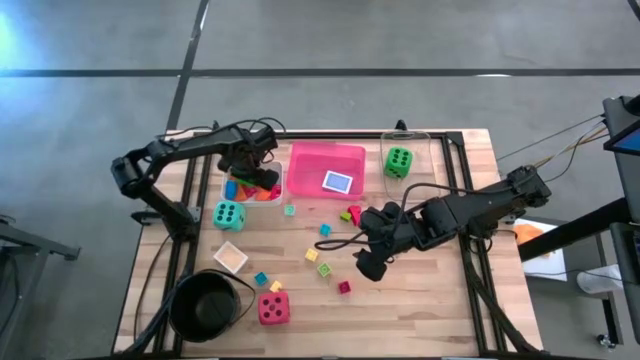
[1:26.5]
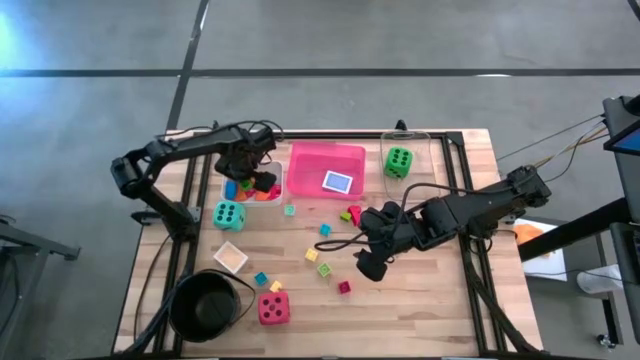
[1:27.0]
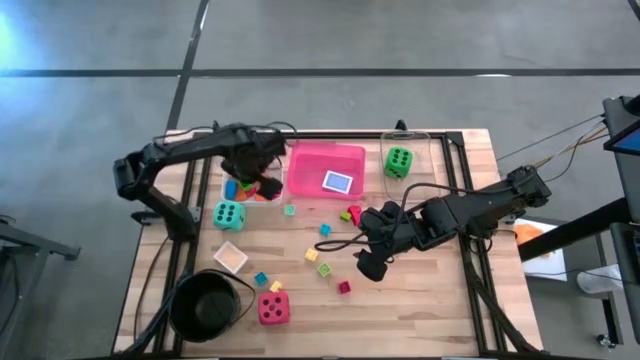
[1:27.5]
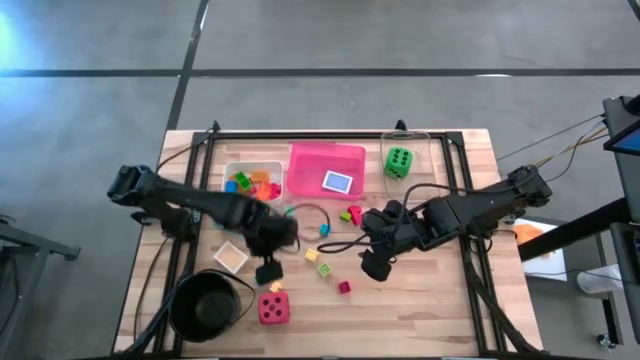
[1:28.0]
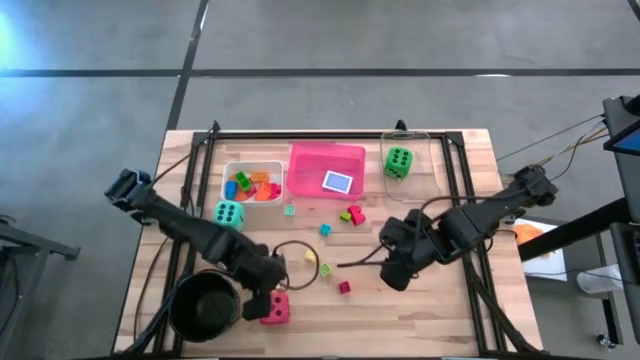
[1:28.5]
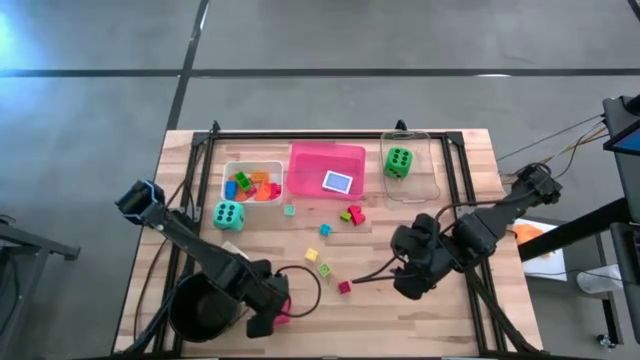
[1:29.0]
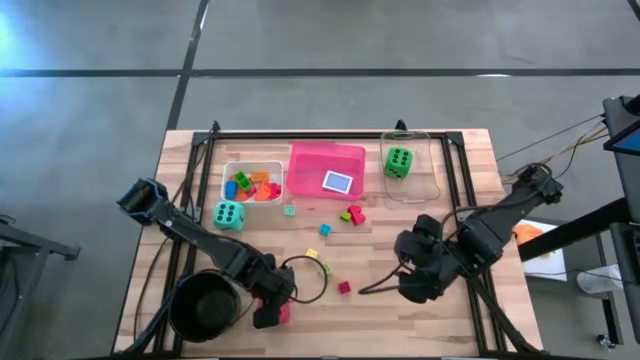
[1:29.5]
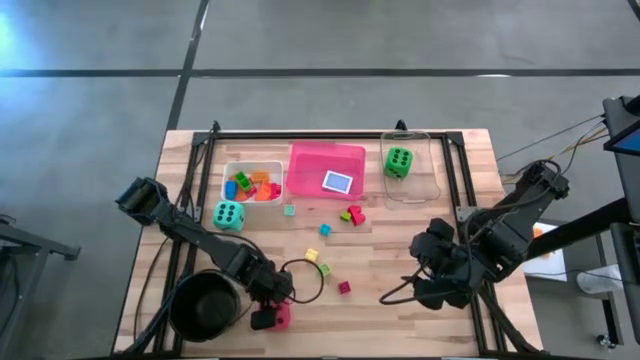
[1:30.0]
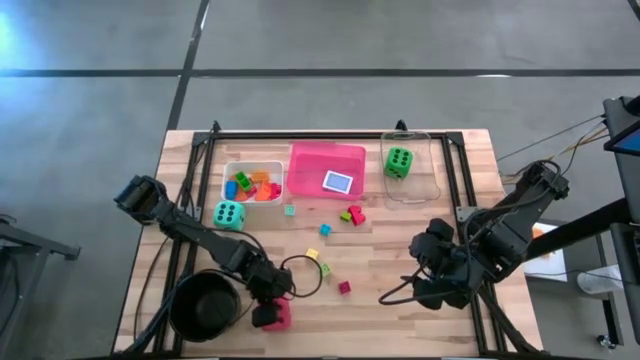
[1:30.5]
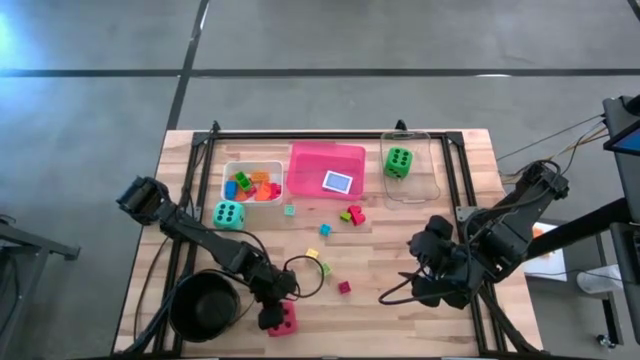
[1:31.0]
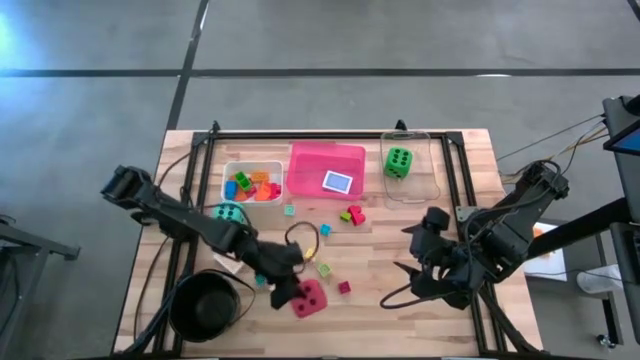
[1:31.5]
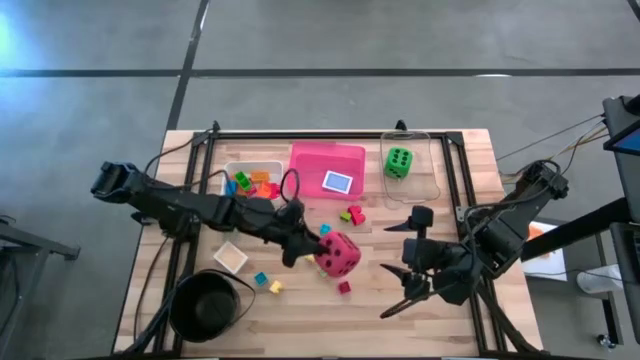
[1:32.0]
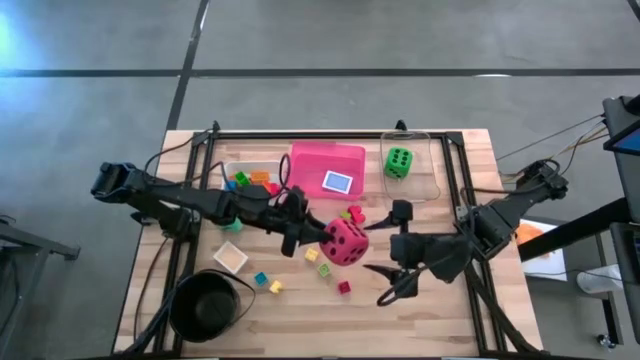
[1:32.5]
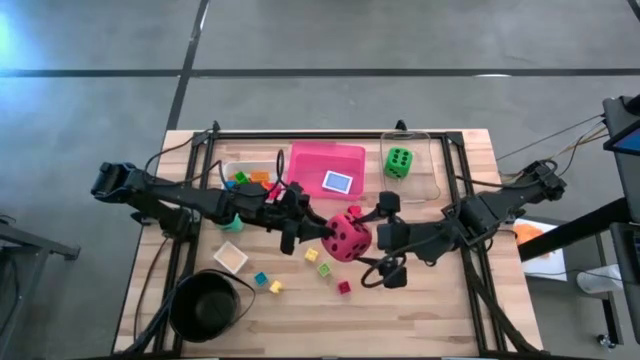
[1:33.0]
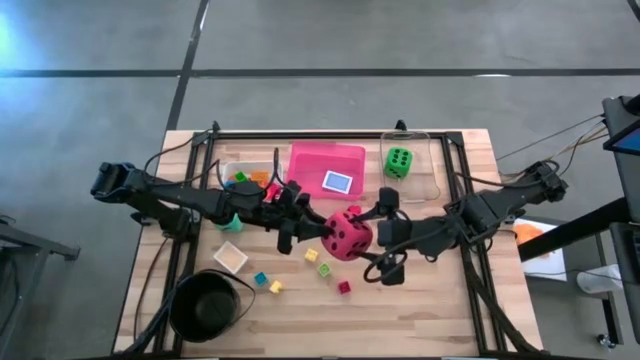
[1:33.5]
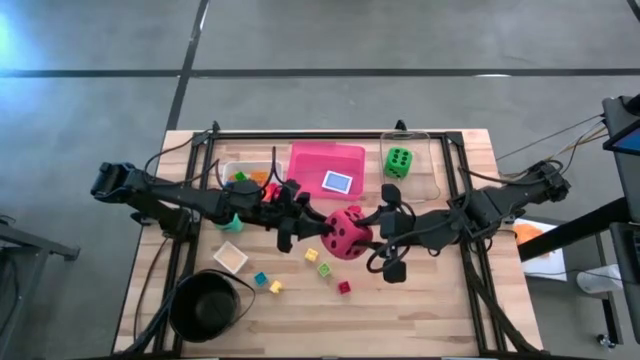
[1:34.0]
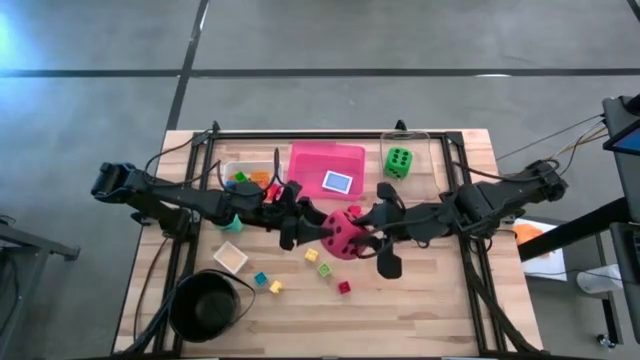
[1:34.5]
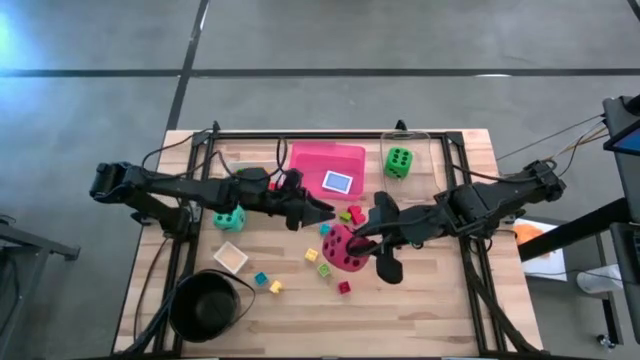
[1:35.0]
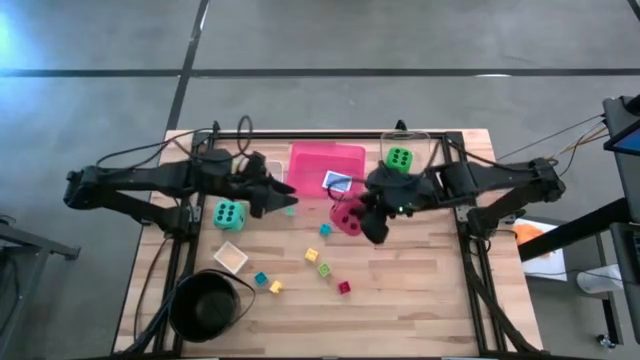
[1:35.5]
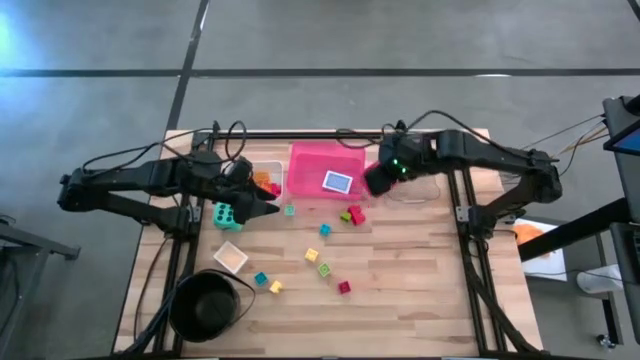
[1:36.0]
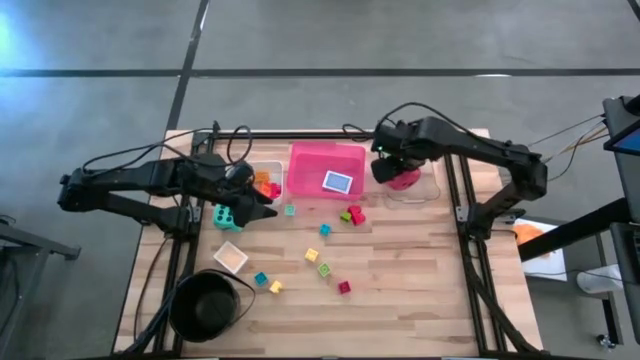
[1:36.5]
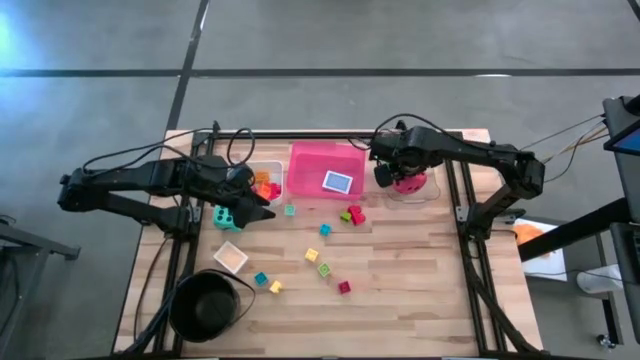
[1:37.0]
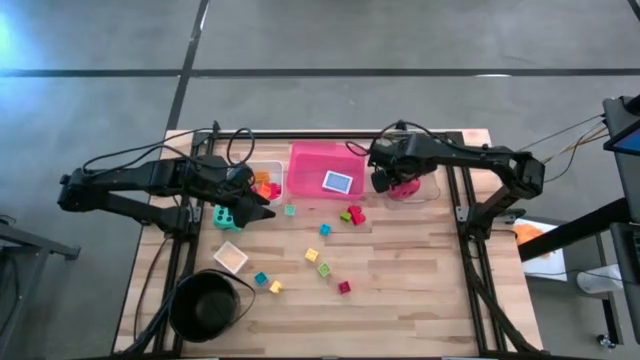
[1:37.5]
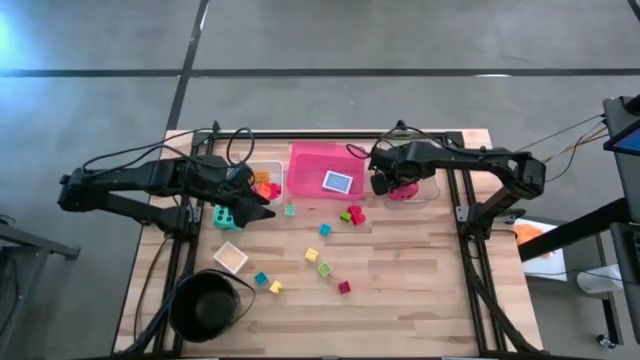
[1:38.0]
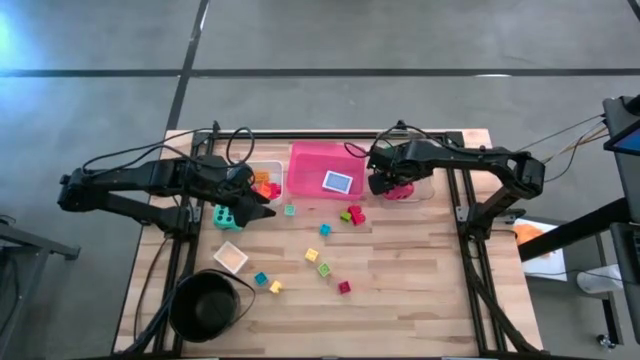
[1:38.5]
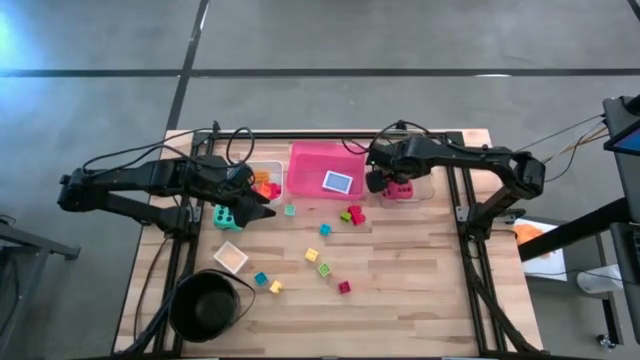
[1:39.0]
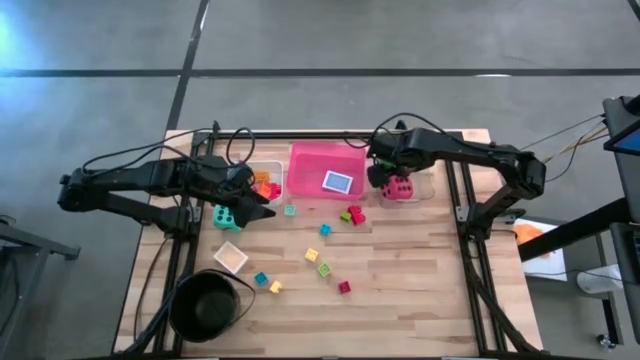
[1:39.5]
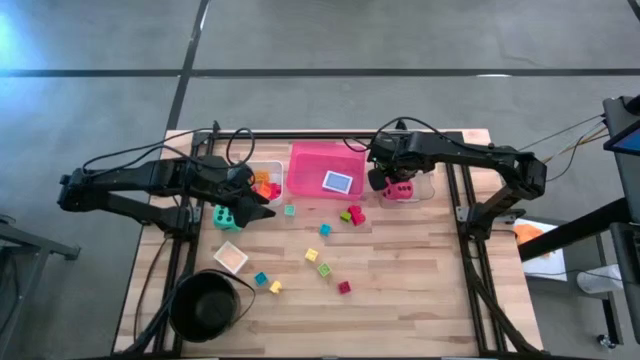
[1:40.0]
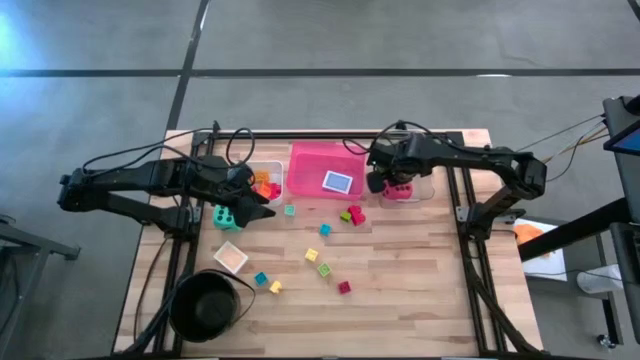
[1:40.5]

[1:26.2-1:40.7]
Task: Pick & Place Toys
Put the red dice into the transparent bin

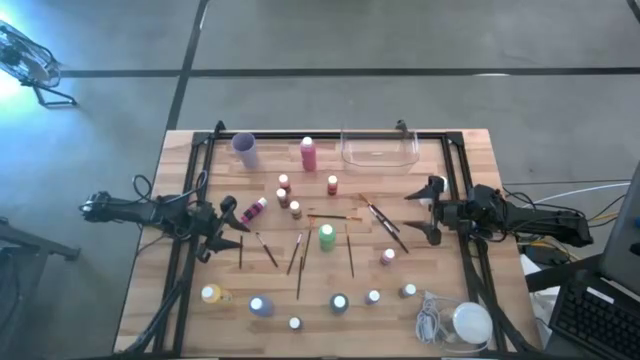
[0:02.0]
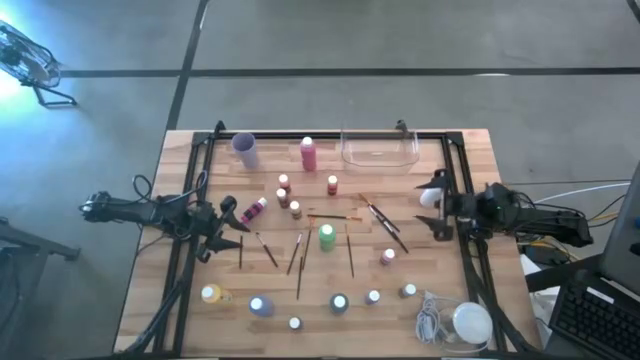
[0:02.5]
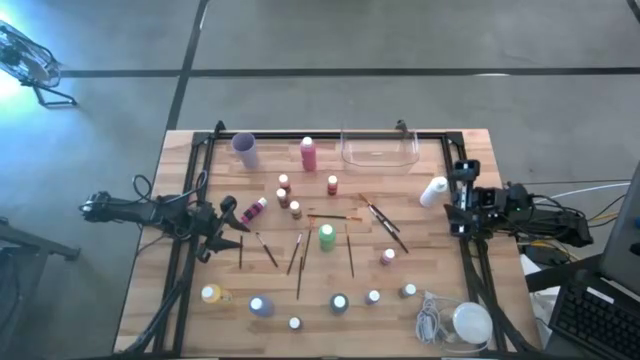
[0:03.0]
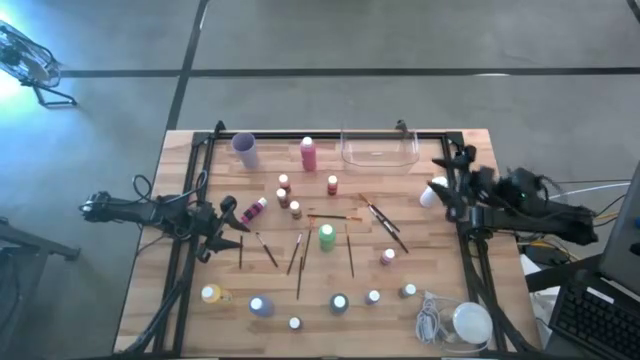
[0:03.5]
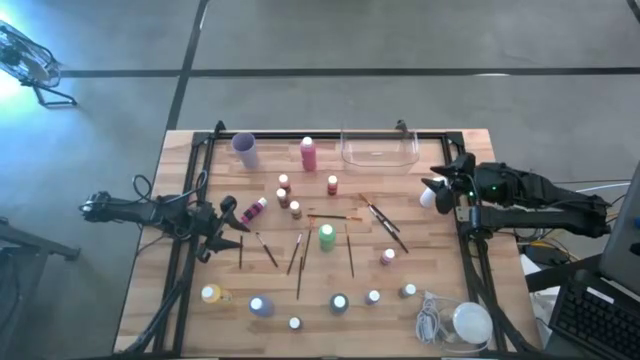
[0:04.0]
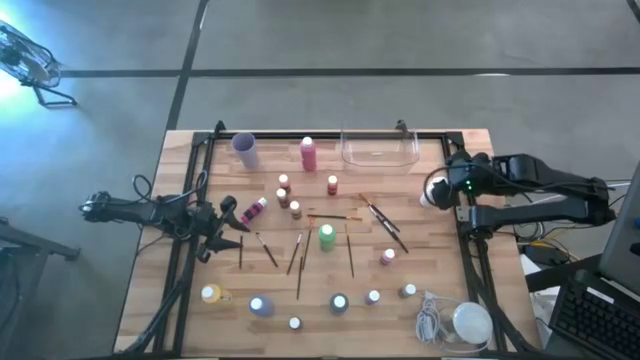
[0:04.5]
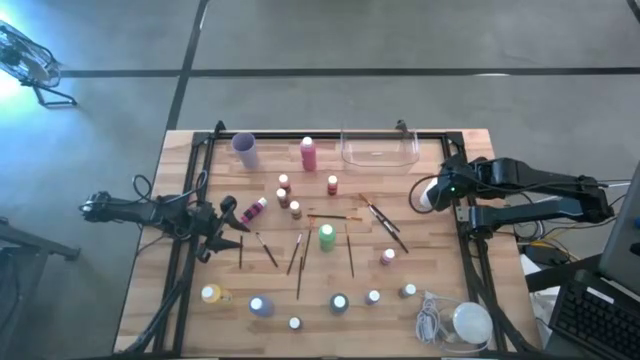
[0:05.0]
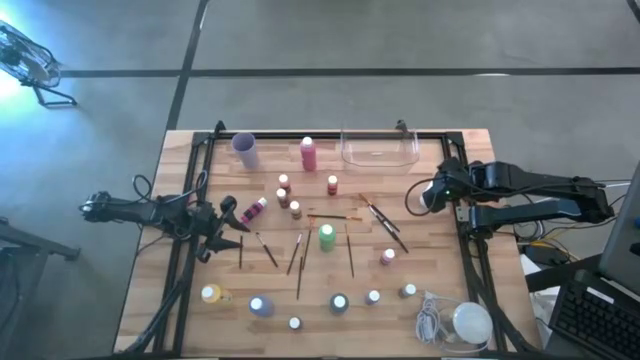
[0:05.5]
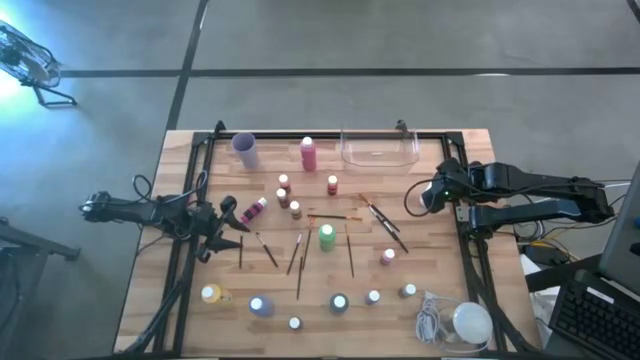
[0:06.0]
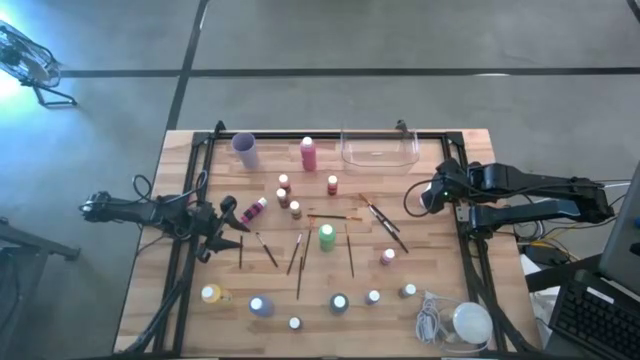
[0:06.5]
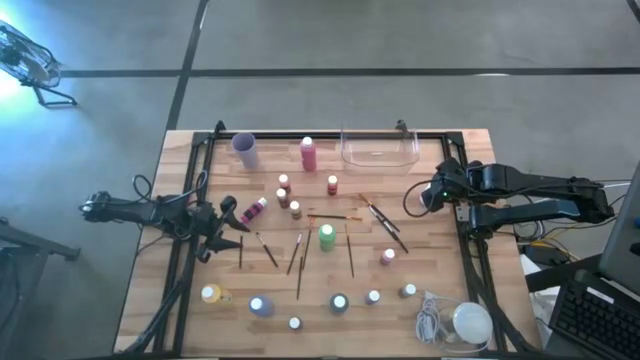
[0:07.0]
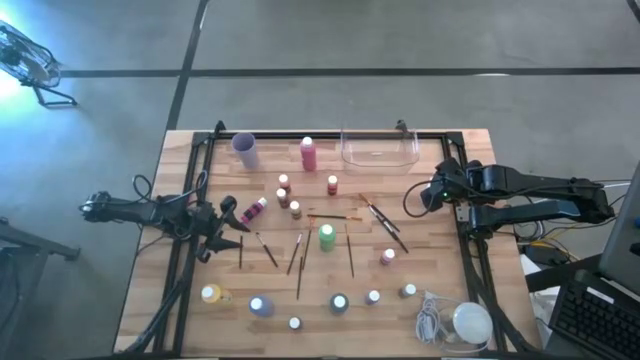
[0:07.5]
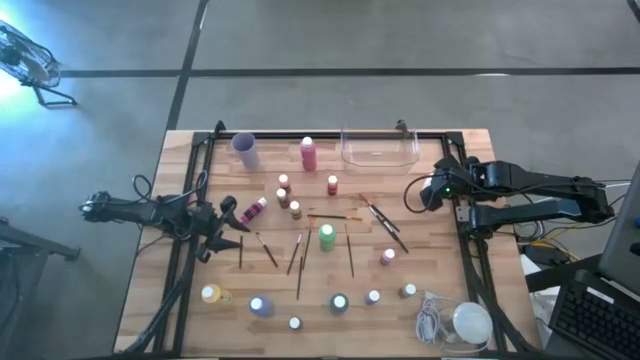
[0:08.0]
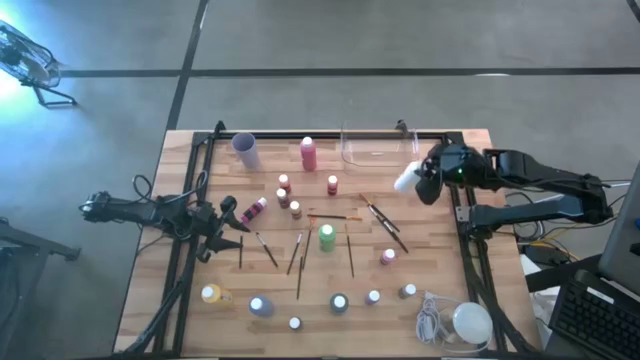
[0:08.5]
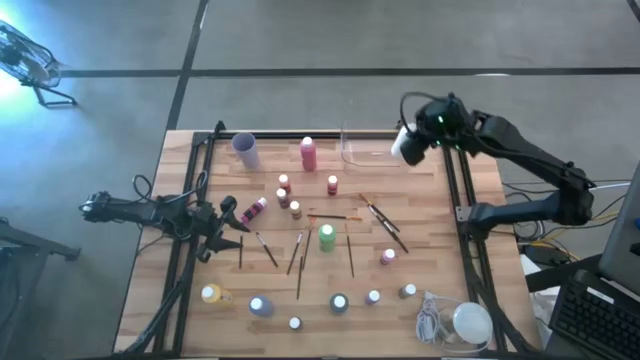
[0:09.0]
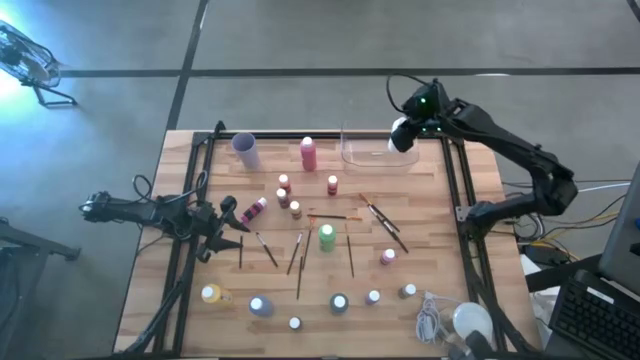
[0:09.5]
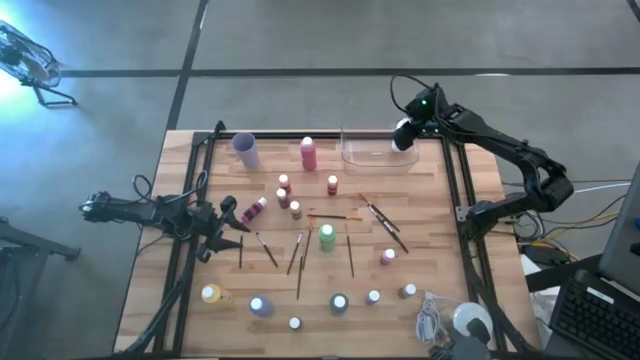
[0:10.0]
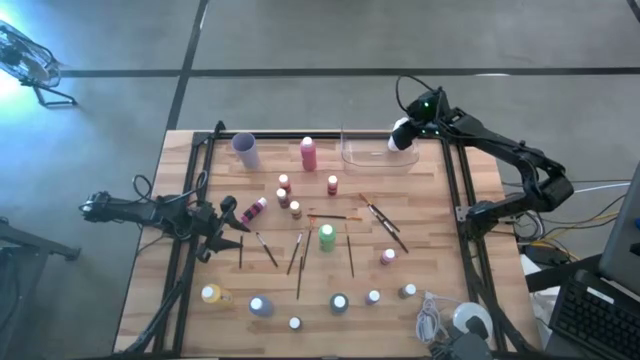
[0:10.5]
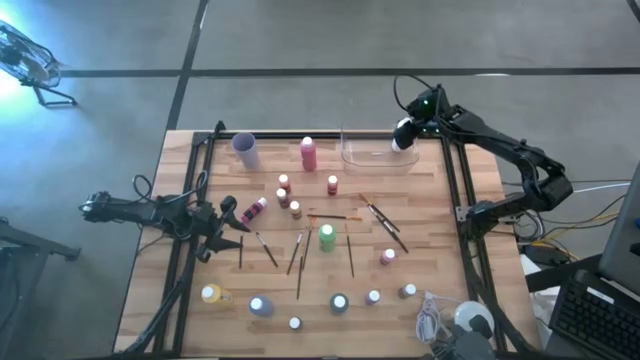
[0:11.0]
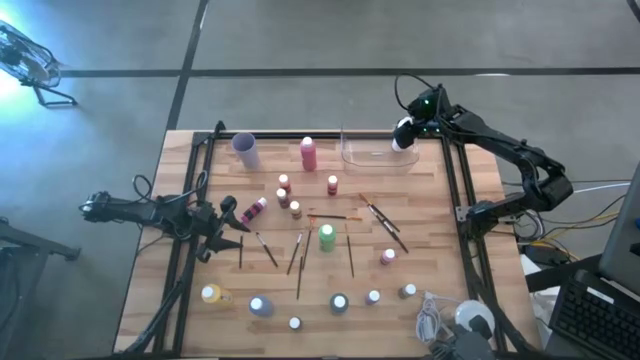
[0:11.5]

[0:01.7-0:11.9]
Task: Pick & Place Paint Supplies
Put the white paint bottle into the transparent bin
